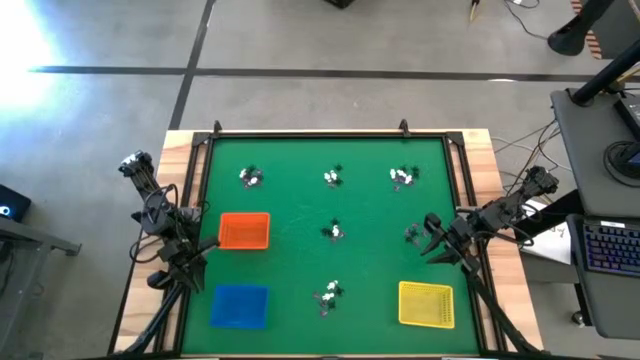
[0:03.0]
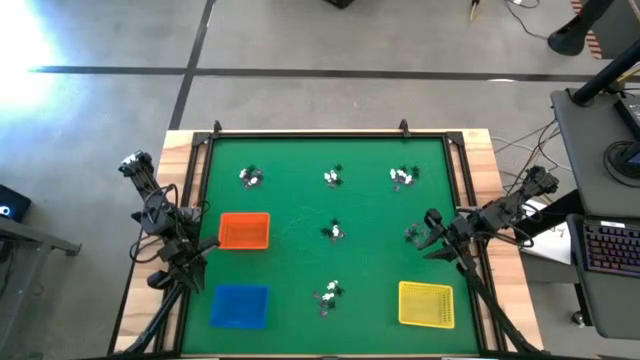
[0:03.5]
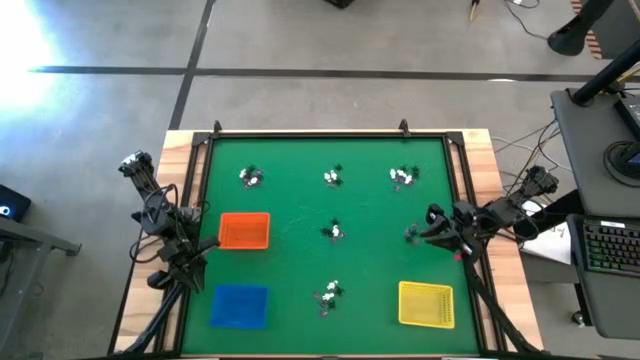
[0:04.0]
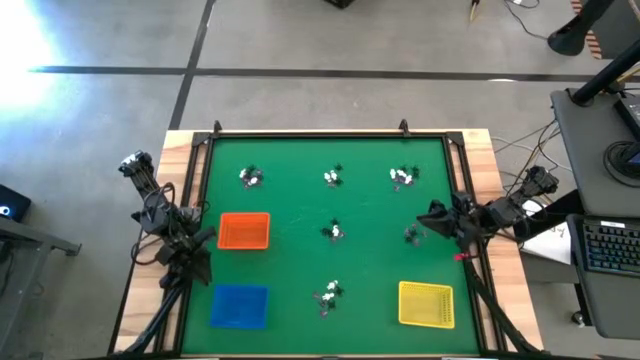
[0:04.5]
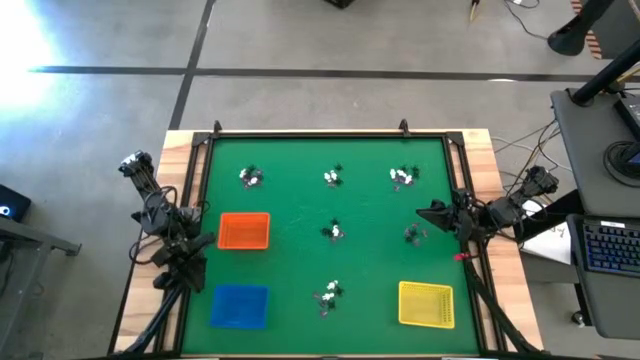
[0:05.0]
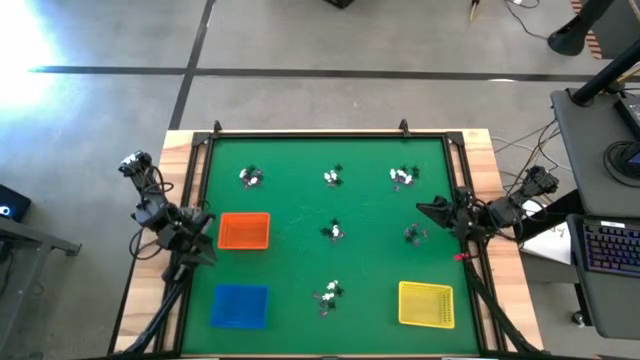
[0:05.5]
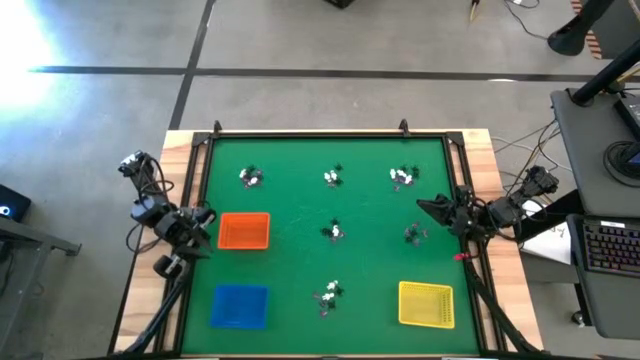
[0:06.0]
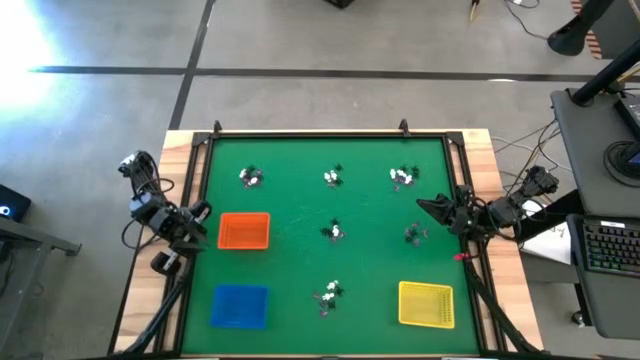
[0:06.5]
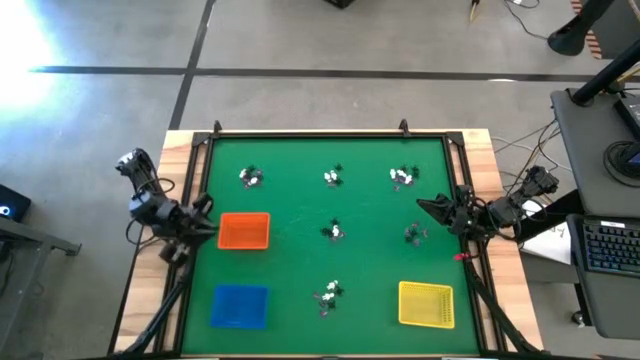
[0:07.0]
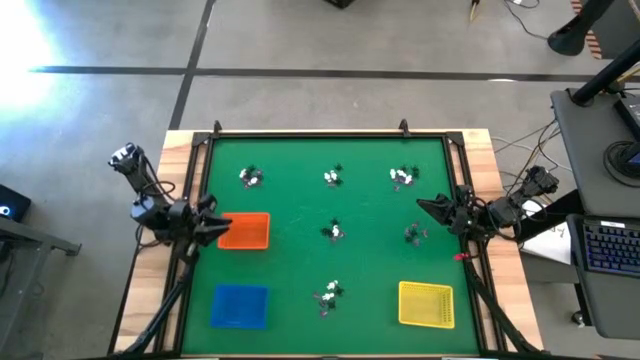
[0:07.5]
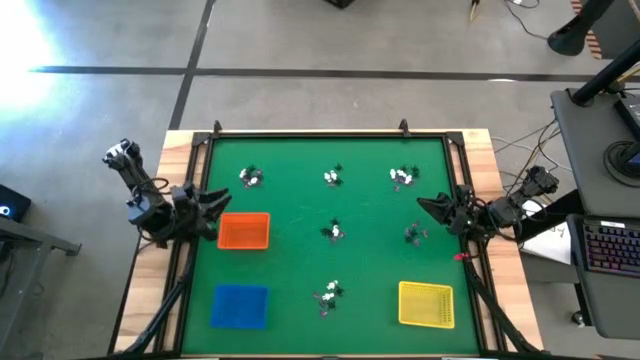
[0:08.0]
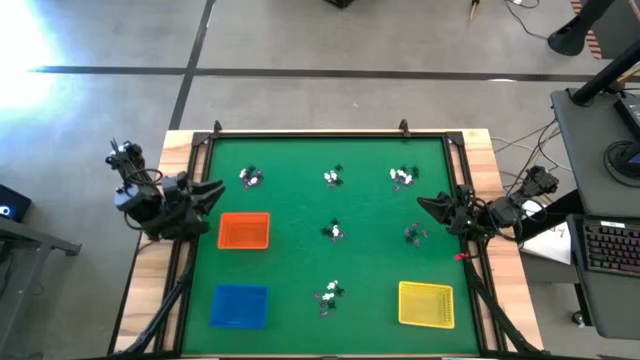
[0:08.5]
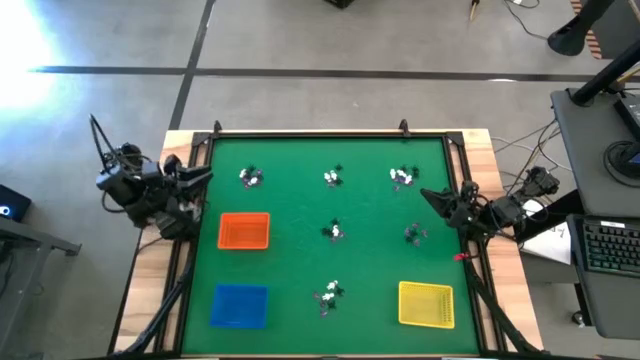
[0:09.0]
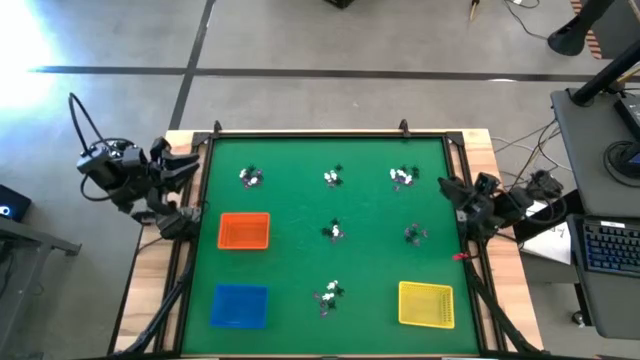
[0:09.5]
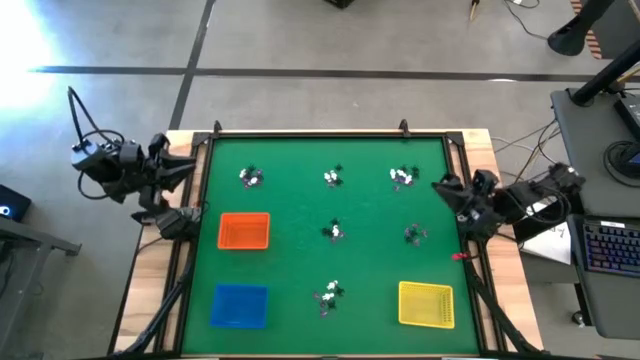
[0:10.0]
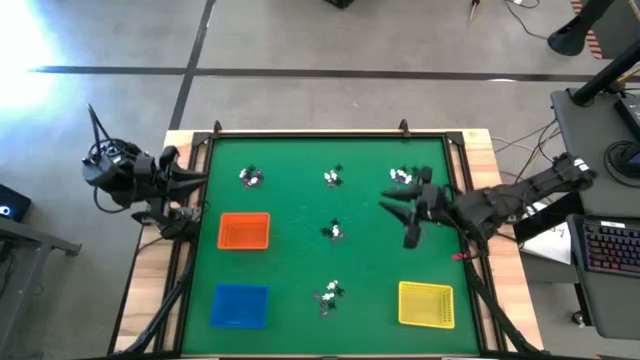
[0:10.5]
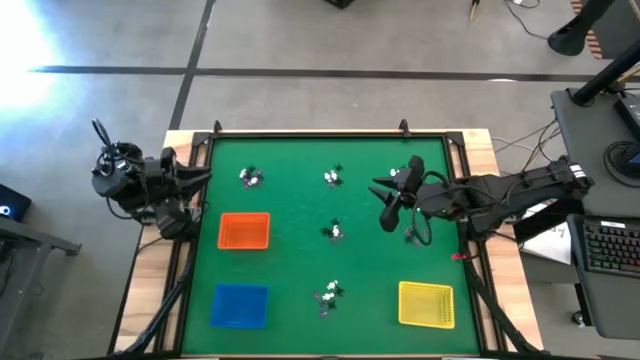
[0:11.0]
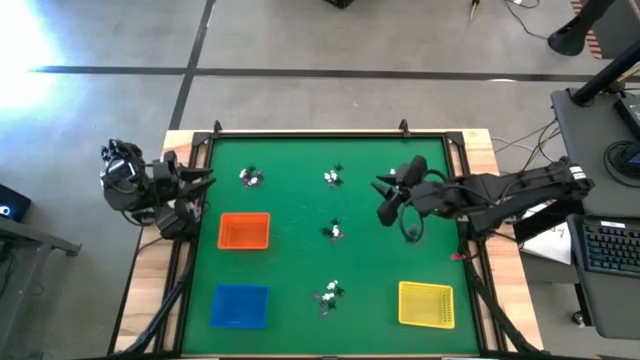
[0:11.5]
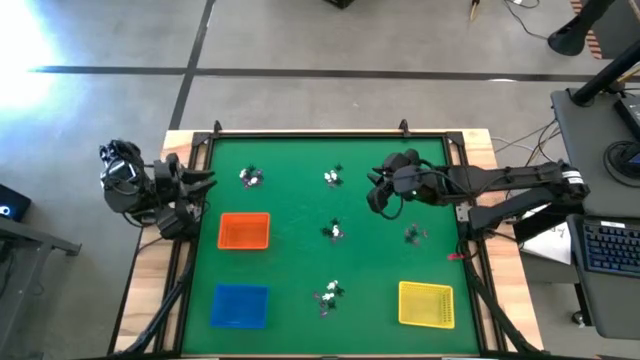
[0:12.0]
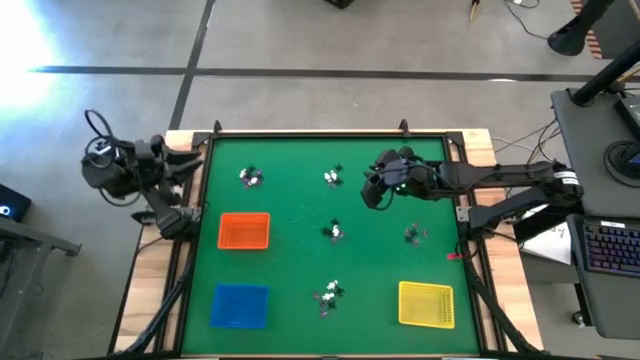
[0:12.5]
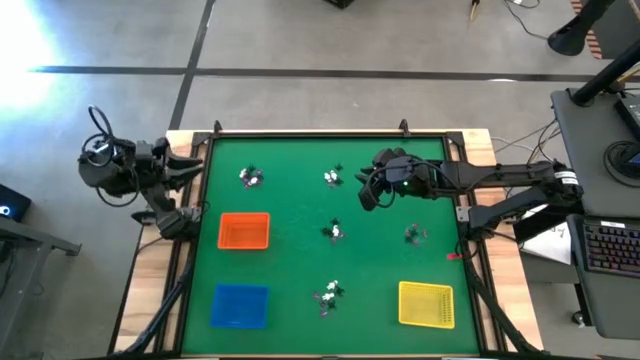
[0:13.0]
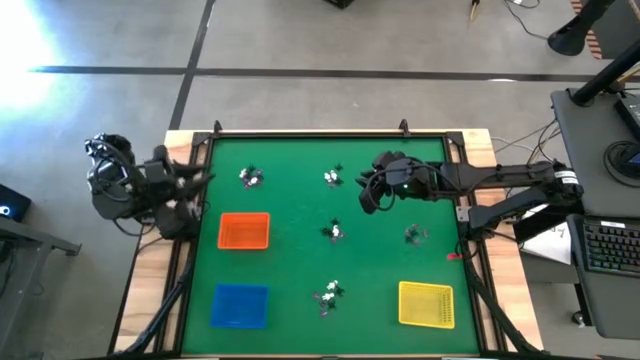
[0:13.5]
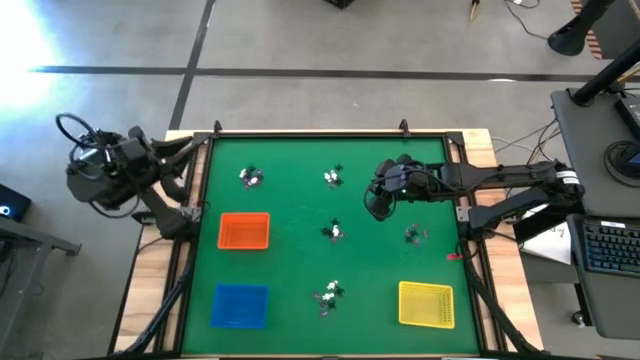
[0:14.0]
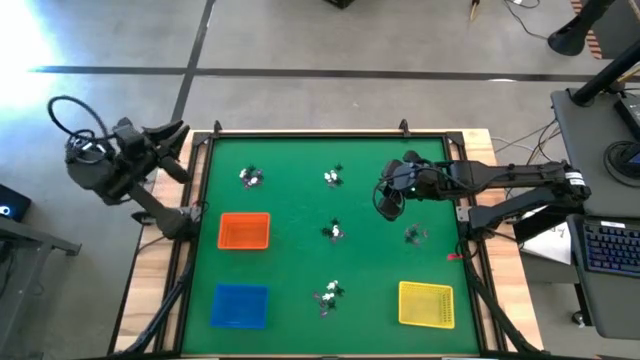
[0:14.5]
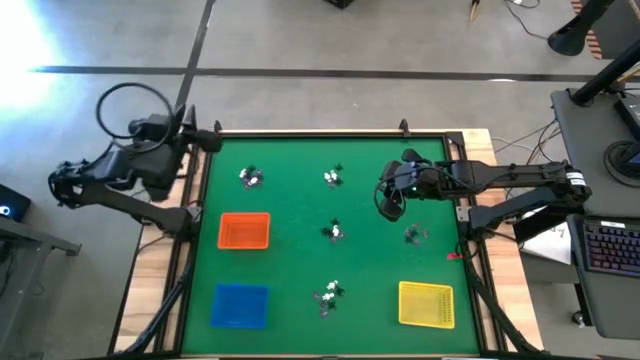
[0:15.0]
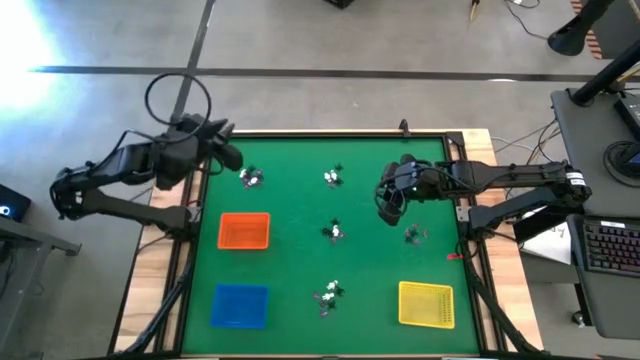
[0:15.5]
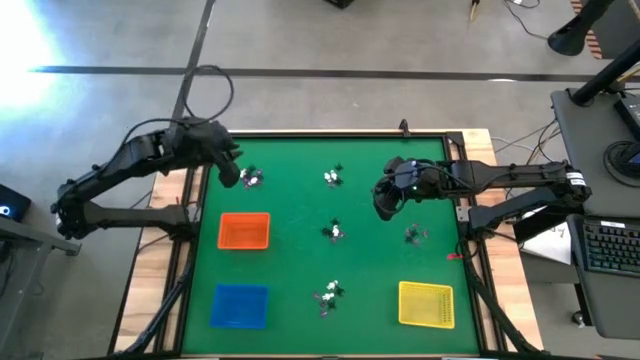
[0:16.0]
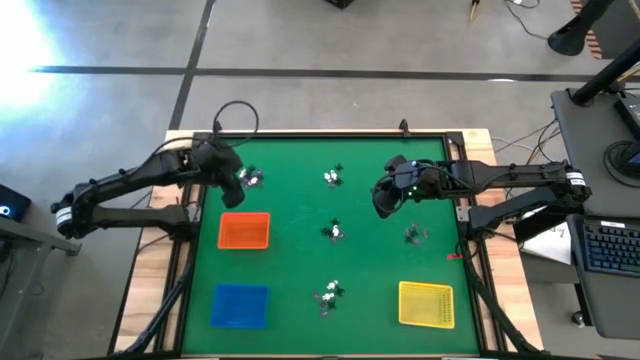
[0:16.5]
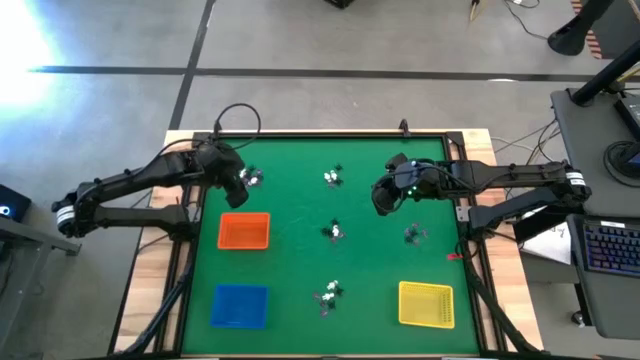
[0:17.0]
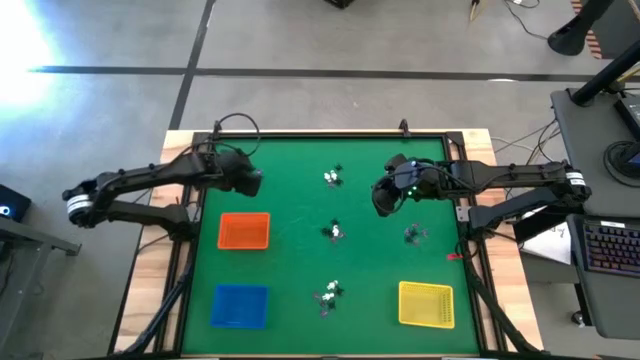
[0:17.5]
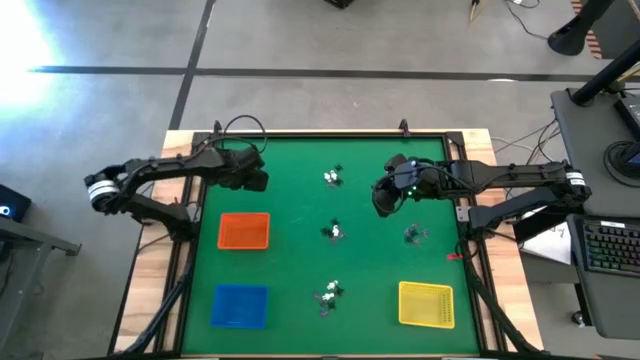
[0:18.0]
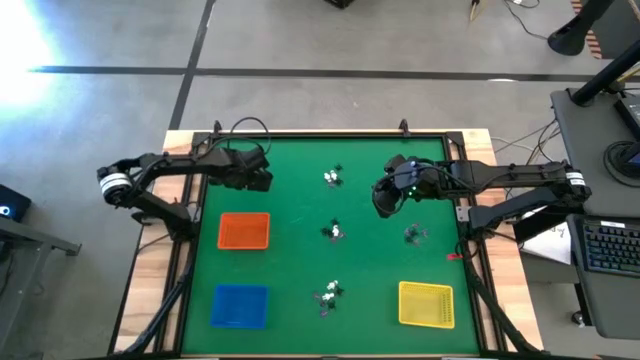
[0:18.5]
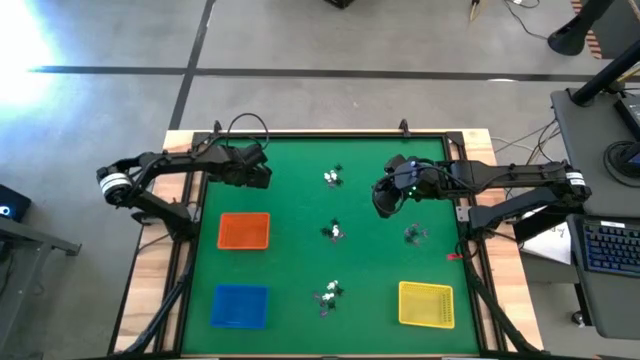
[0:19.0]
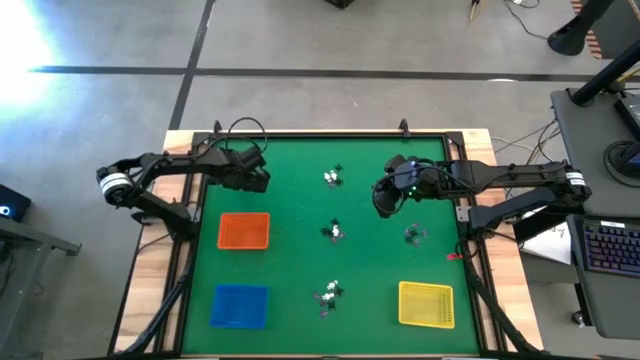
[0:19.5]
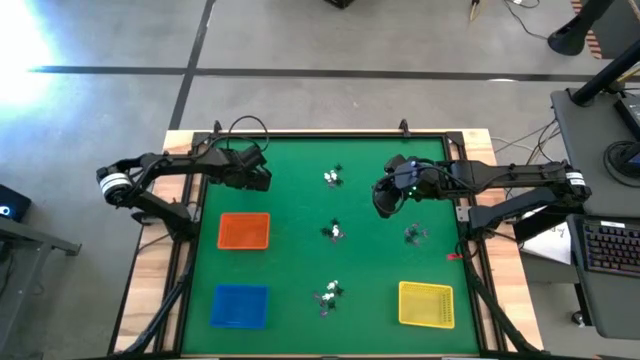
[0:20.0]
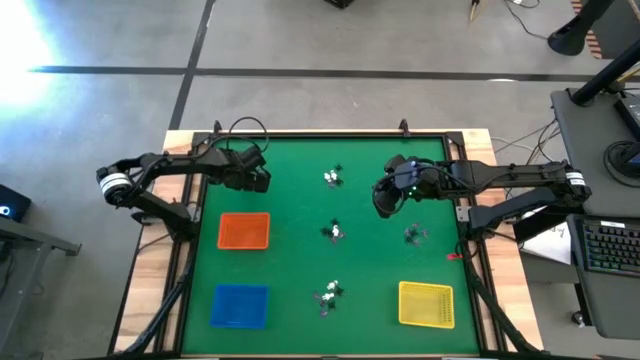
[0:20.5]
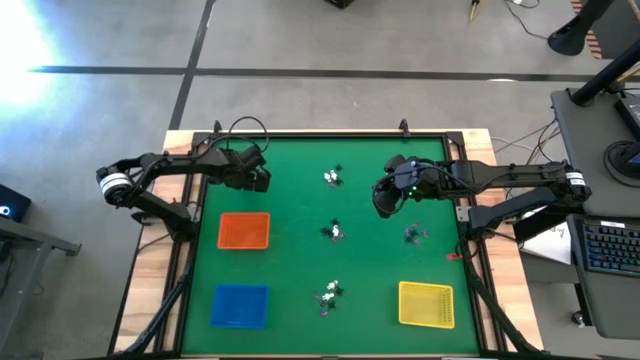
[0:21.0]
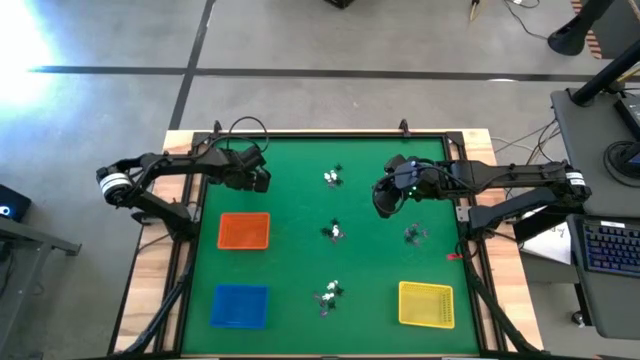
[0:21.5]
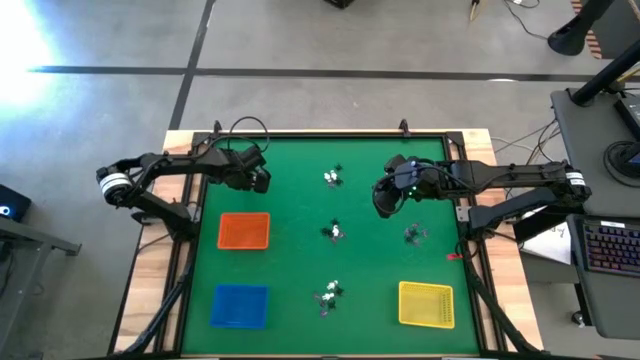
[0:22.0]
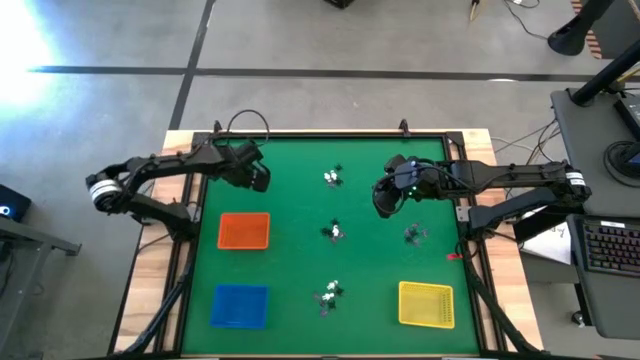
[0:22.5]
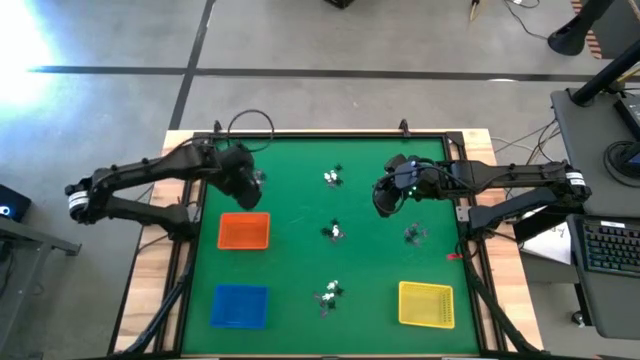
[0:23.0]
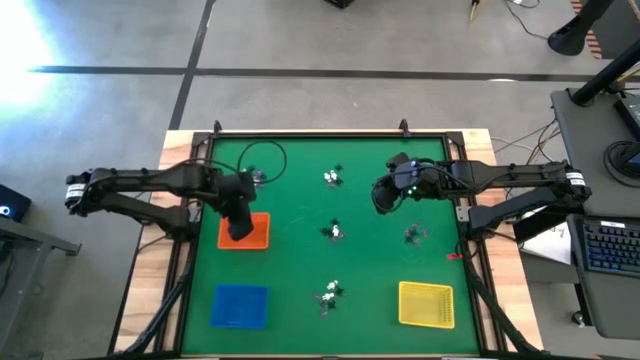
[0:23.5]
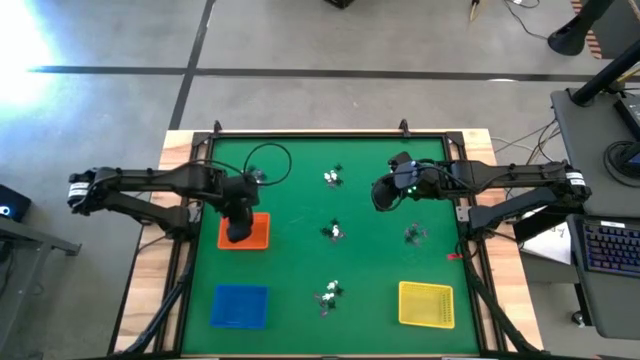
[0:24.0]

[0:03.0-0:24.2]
Task: Sort Halloween decoration
Put the violet witch hat toy into the orange bin
